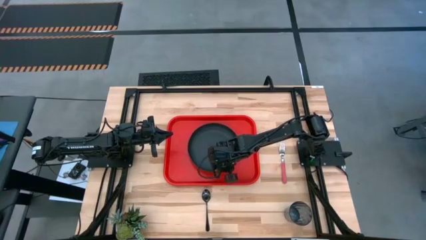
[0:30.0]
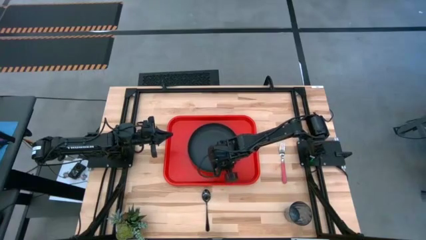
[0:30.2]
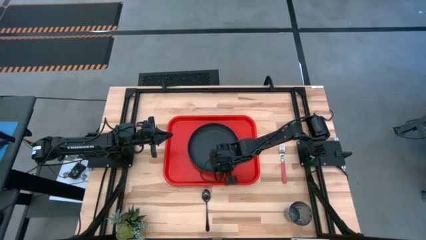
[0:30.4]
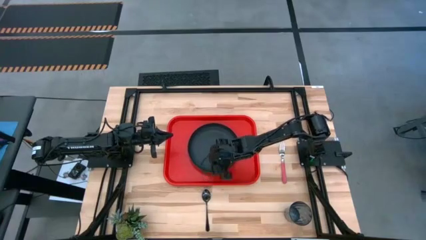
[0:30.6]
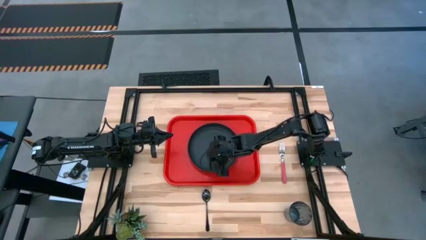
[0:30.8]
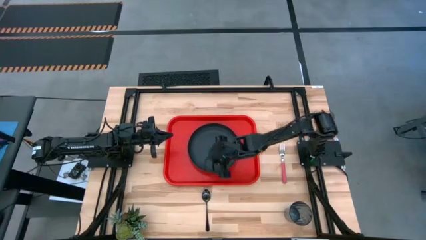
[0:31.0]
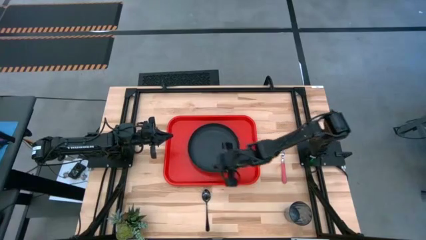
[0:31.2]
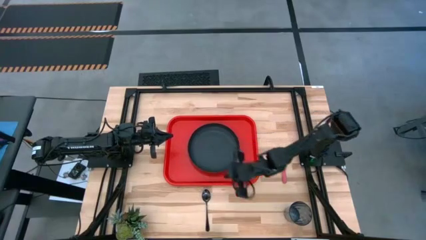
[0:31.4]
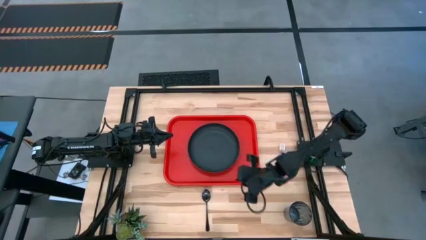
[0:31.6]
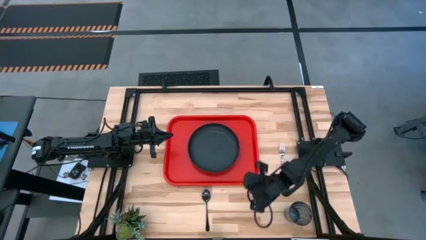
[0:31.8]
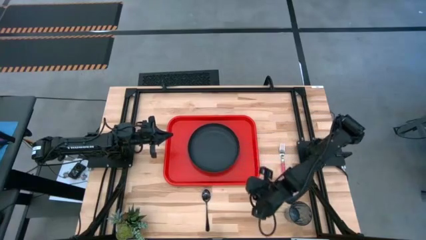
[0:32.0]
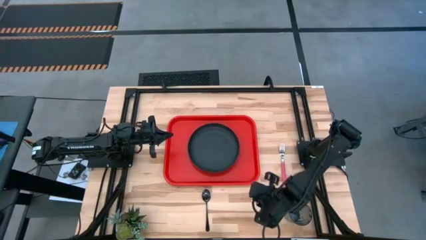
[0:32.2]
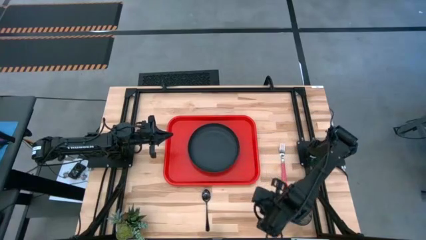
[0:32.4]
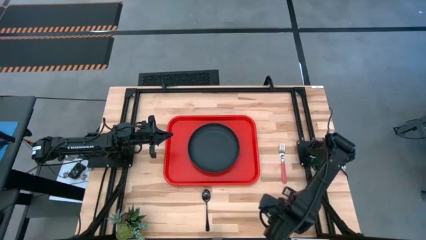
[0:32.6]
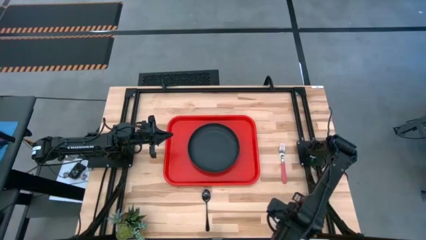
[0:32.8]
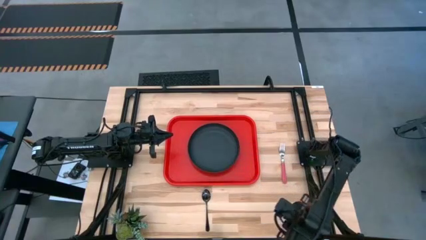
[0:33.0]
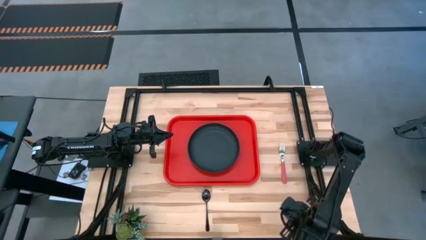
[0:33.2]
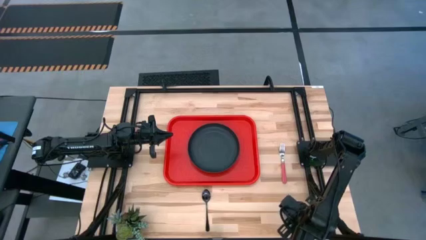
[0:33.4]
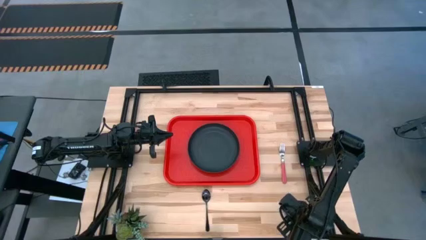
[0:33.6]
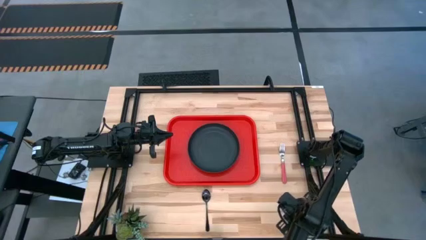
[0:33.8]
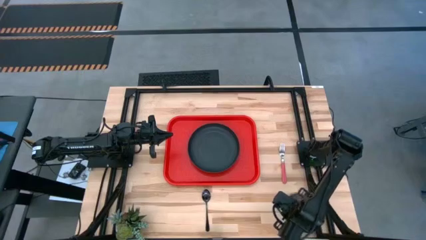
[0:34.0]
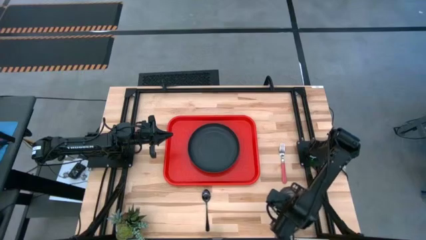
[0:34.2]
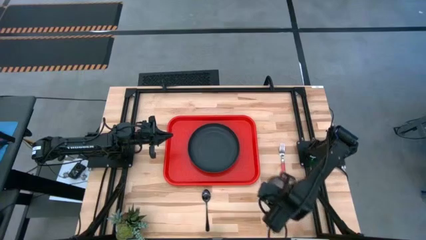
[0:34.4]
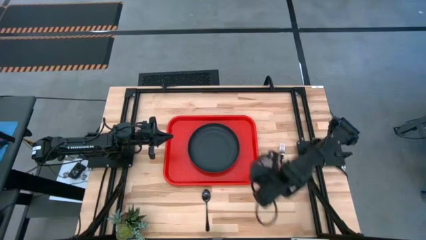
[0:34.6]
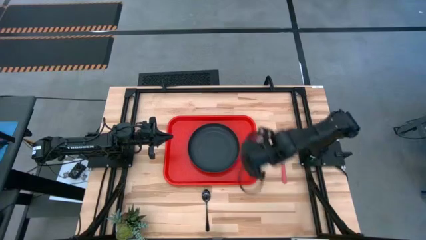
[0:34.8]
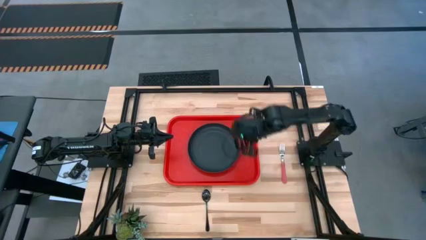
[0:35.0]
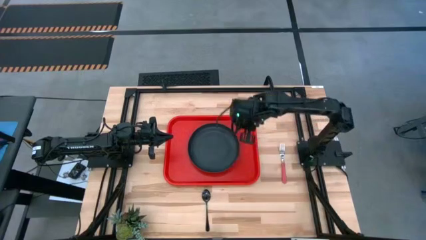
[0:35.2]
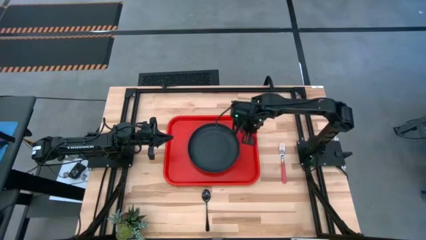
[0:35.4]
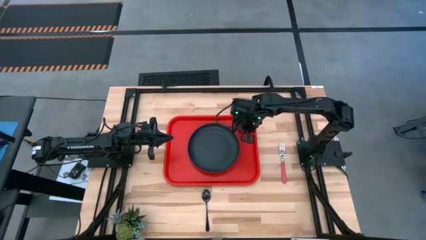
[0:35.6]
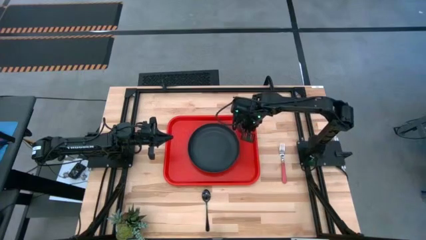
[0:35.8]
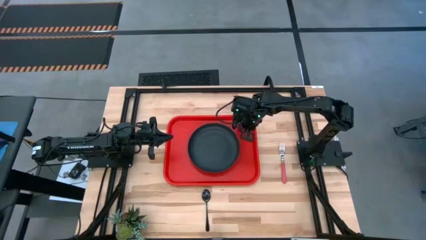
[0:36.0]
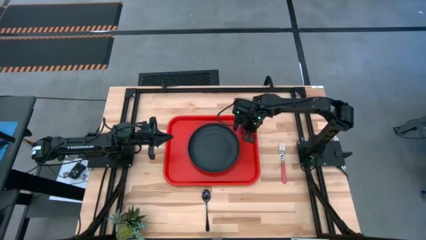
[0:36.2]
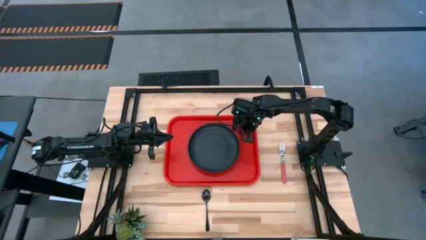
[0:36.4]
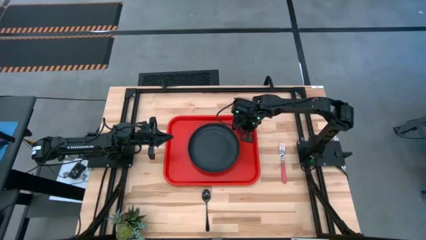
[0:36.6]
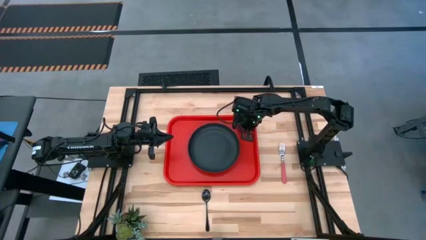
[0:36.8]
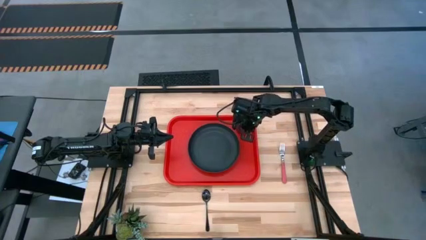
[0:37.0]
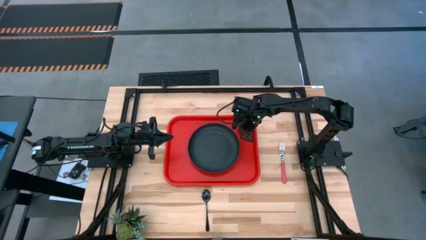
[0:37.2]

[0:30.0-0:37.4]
Task: Pick and place plate/cup/fork/spoon on tray
Put the blue glass on the red serving tray to the top right of the black plate

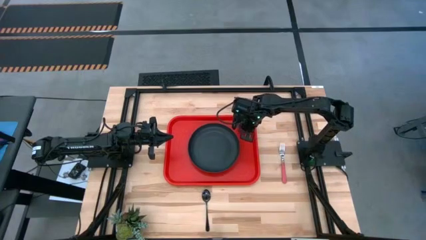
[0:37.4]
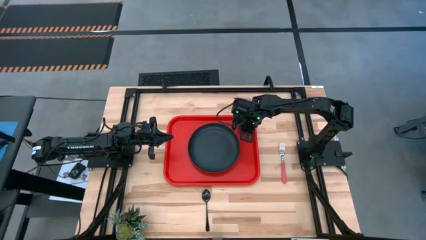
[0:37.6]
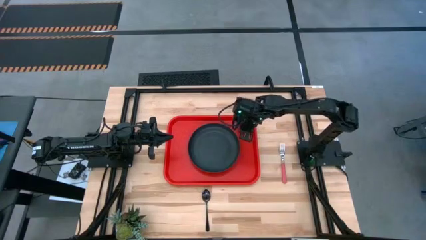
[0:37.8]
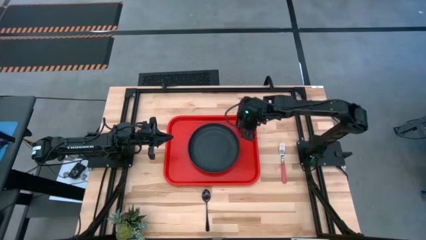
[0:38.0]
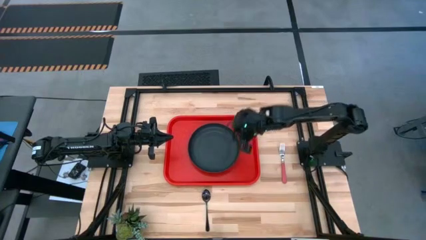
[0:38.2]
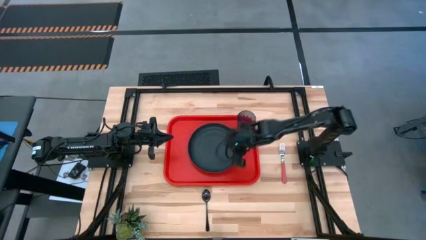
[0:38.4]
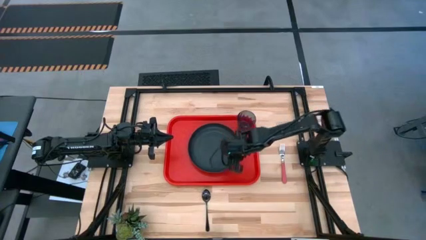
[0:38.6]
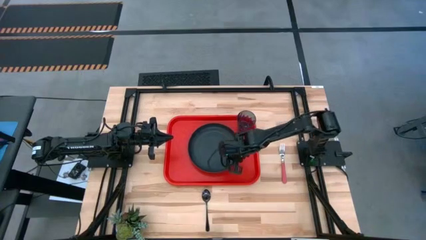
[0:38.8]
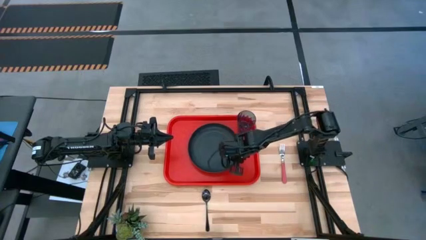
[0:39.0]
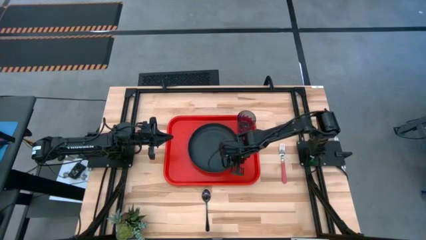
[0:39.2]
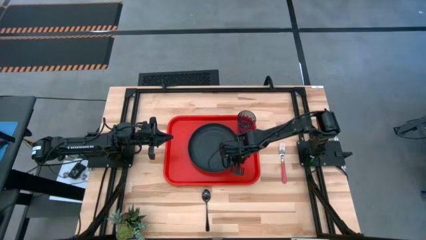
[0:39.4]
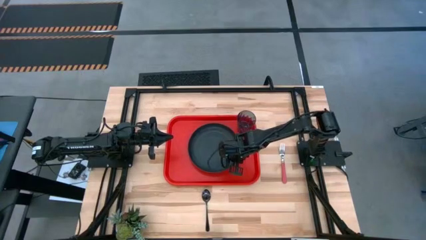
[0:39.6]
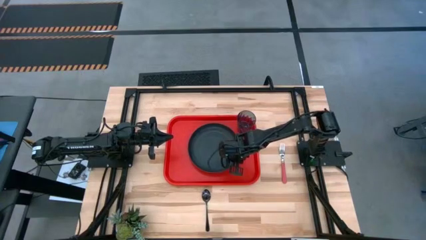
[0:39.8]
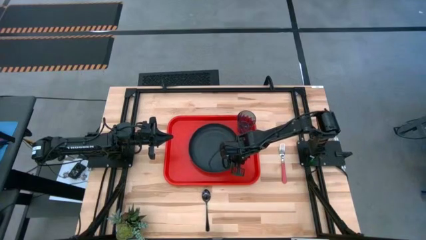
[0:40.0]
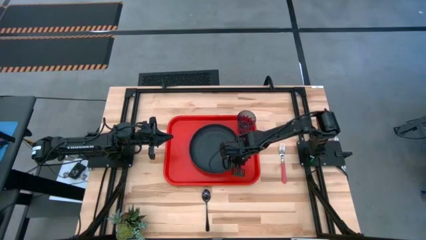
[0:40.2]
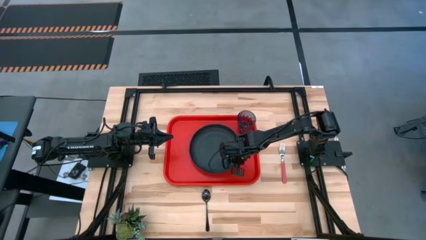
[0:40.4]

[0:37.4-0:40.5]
Adjust the black plate on the red serving tray

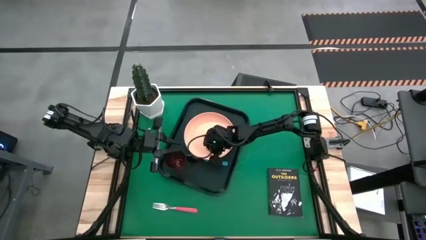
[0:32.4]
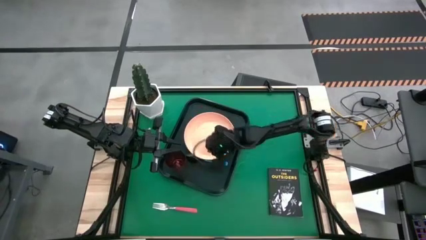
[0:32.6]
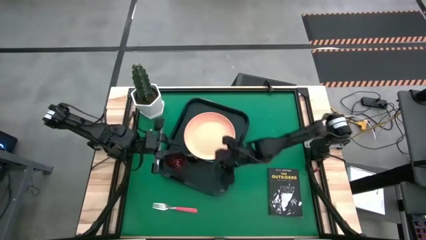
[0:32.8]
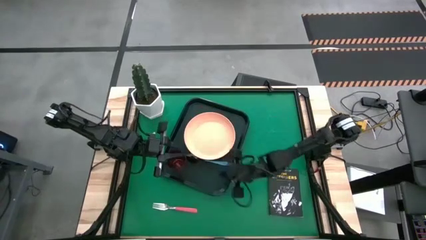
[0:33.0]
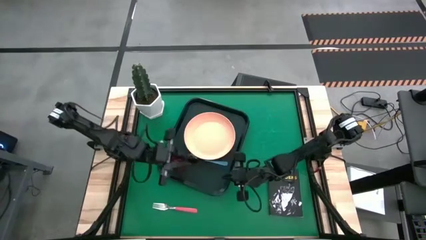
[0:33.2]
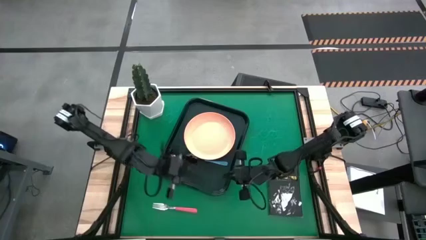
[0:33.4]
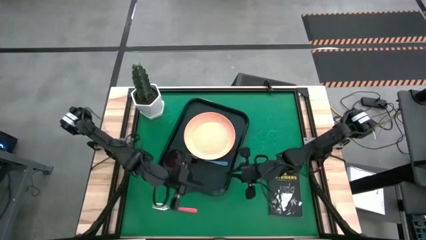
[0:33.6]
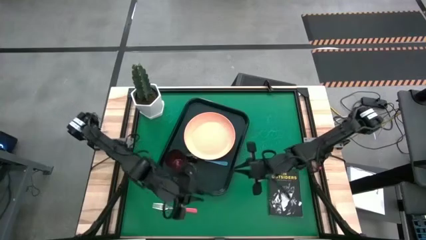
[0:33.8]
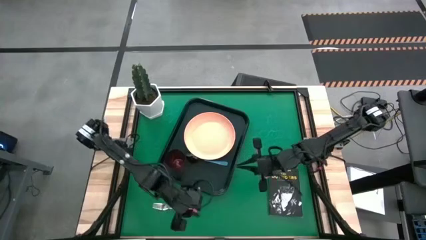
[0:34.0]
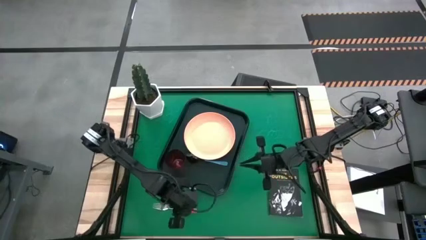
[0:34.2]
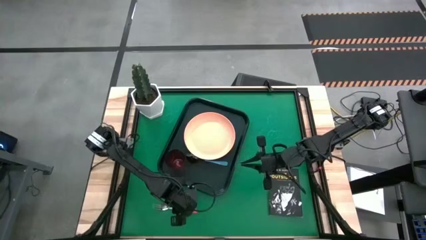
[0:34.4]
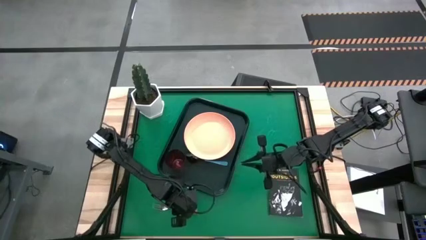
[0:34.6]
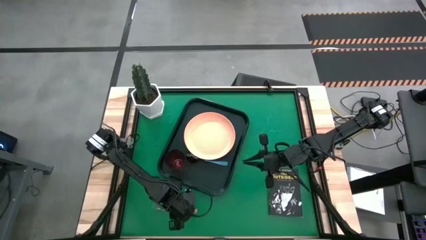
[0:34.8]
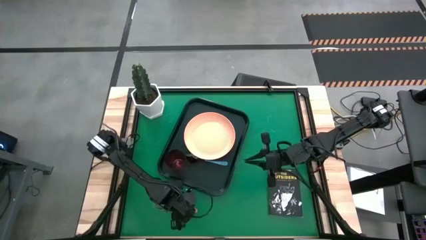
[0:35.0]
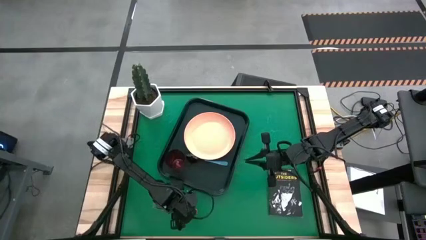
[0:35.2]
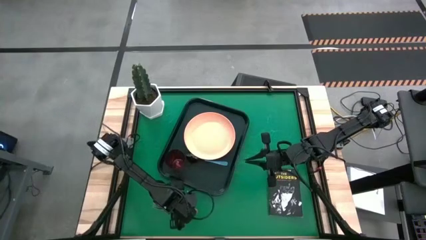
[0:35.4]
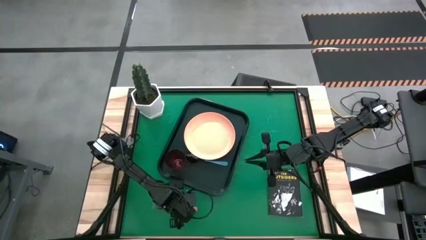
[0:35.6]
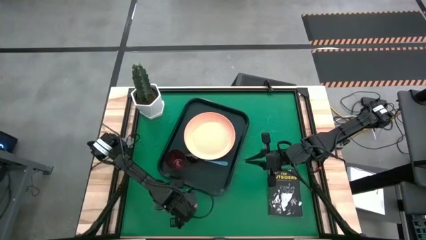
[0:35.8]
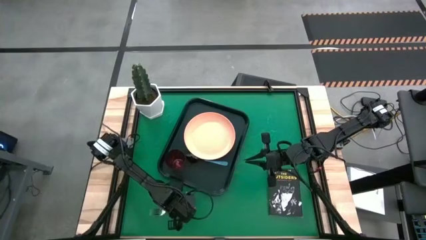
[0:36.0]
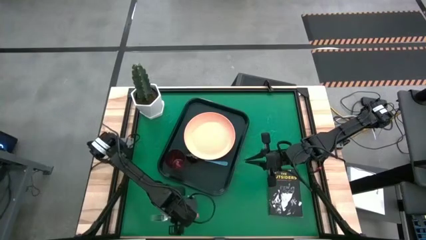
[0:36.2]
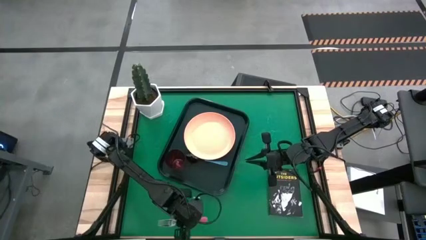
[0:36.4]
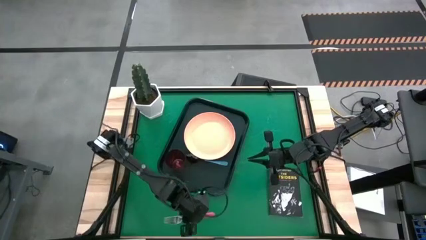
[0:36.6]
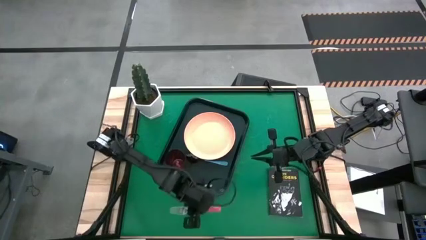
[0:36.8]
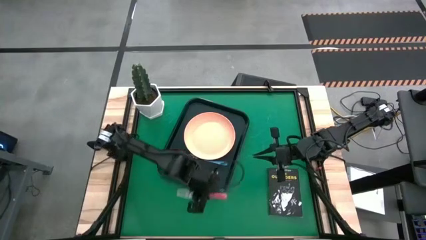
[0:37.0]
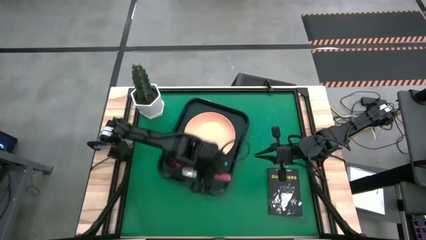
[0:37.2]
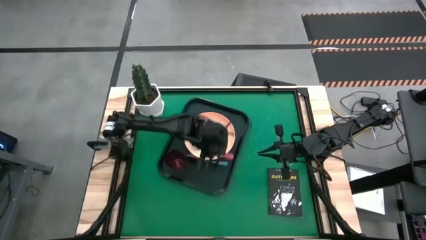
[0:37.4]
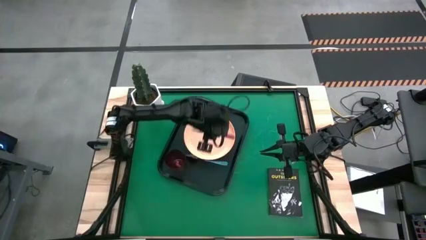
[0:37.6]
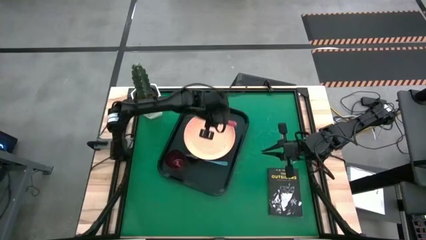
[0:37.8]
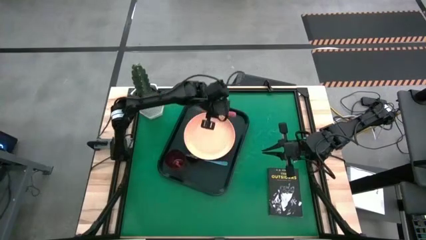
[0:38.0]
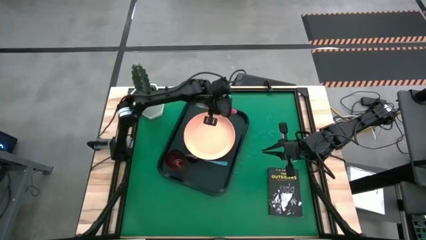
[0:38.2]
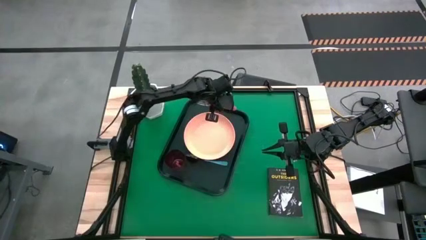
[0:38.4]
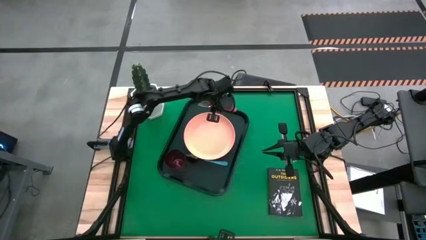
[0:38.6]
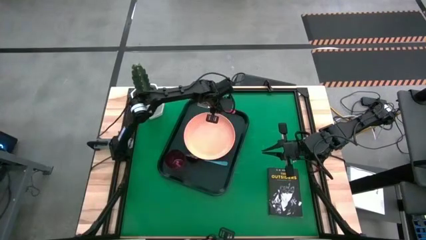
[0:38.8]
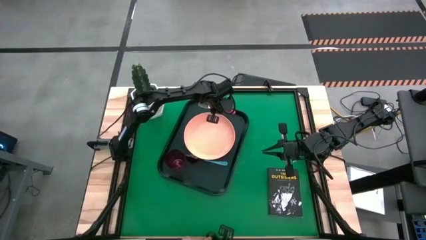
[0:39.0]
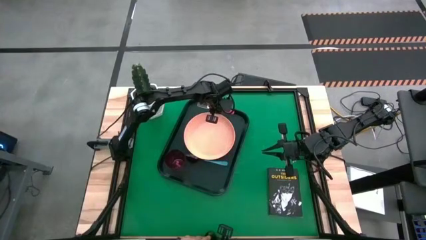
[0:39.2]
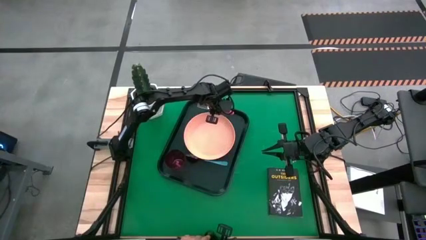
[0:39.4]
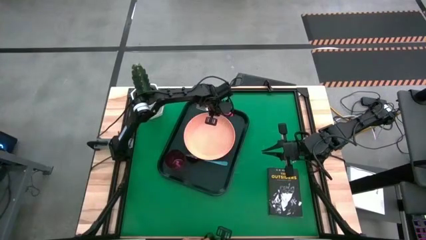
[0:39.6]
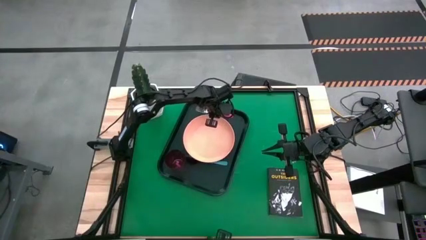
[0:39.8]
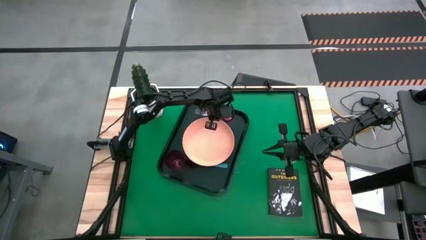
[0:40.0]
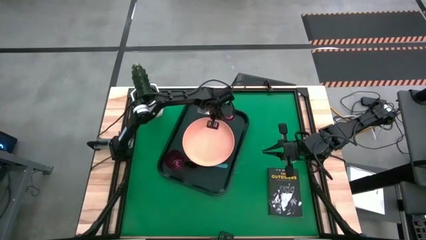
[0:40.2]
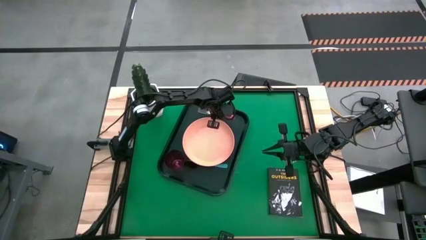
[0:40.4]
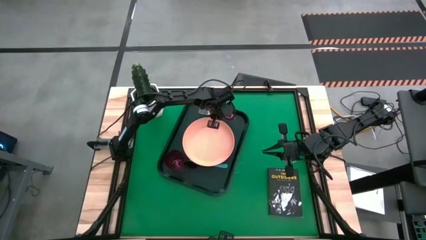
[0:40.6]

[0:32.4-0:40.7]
Task: Pick and place plate/cup/fork/spoon on tray
Put the pink fork on the serving tray to the right of the orange plate
